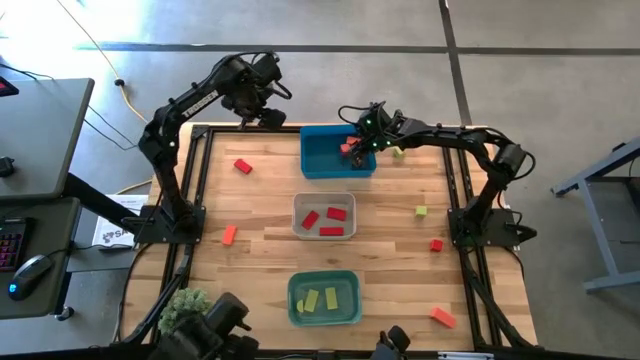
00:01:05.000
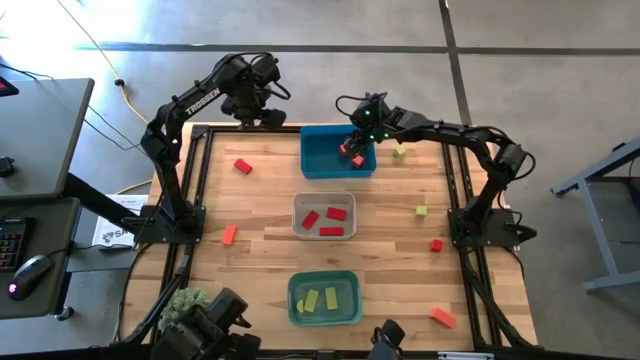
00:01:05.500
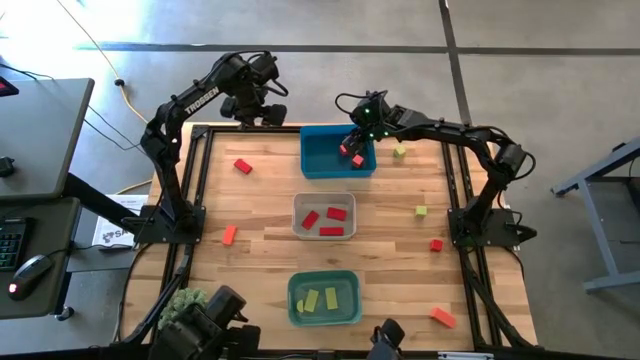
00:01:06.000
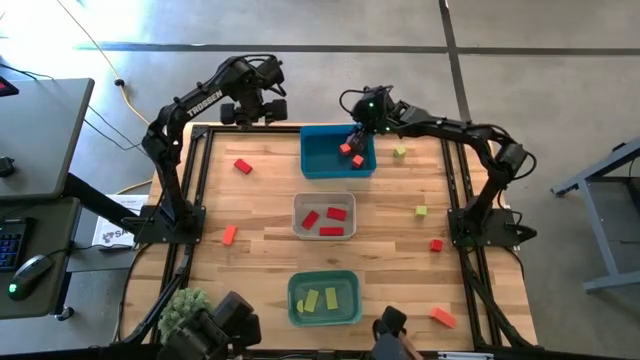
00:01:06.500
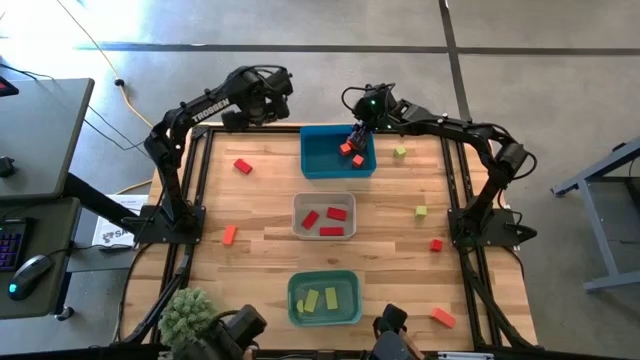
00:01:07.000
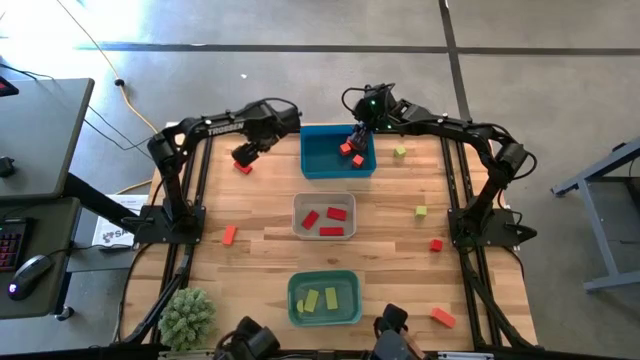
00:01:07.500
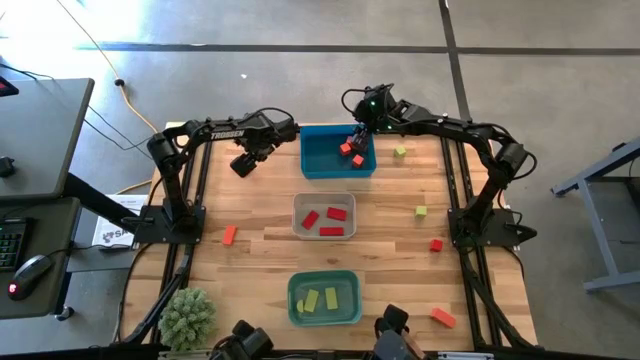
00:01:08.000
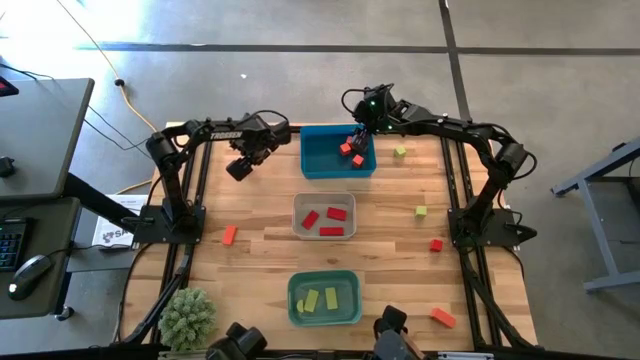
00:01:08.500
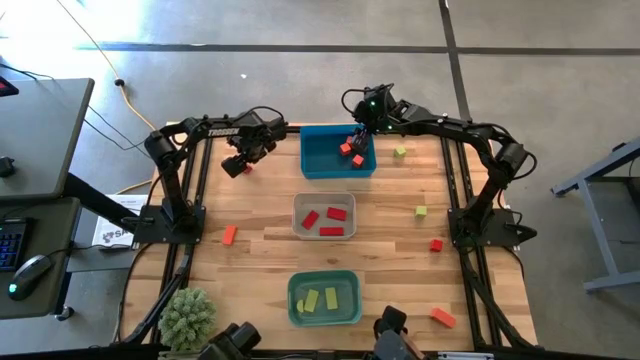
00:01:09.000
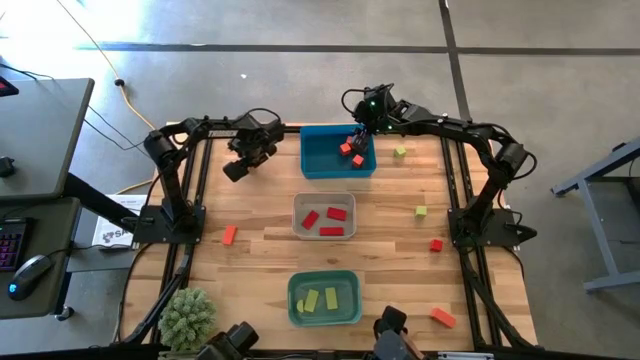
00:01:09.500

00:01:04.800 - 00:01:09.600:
Task: Sort & place blocks by color
Put the red block into the gray bin

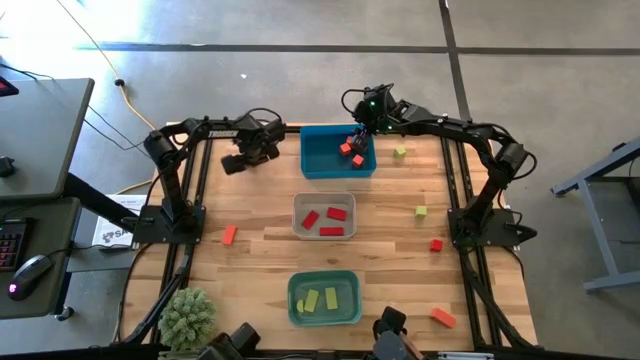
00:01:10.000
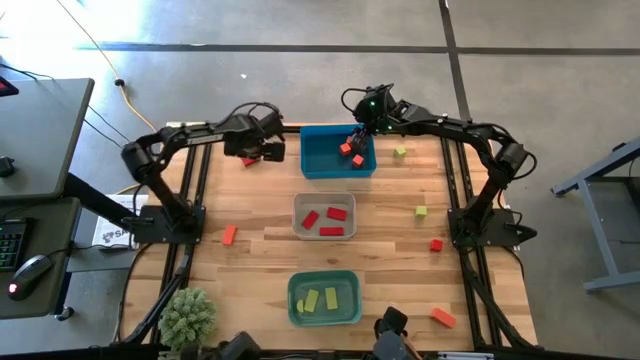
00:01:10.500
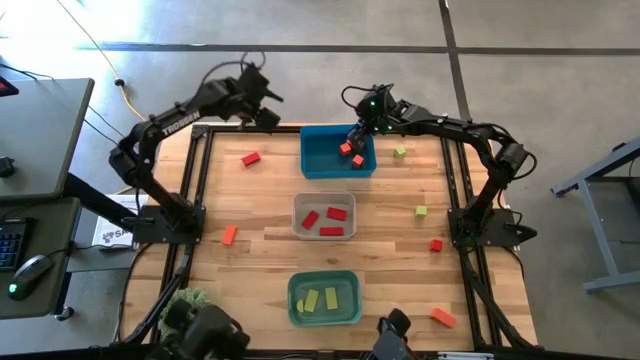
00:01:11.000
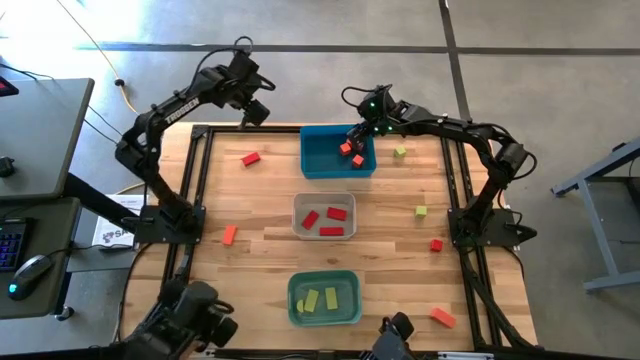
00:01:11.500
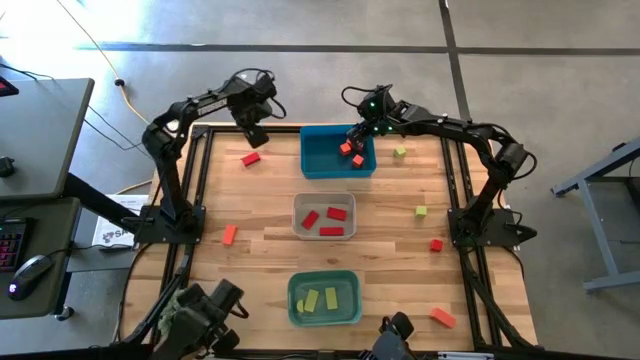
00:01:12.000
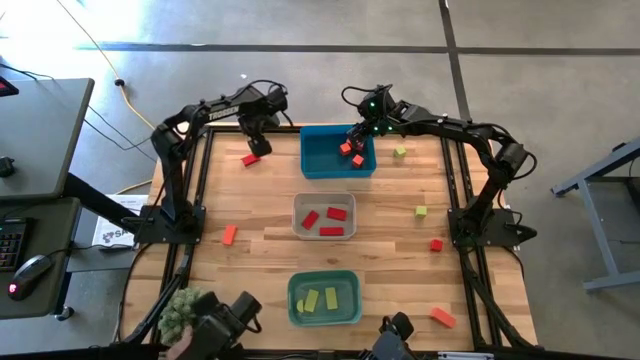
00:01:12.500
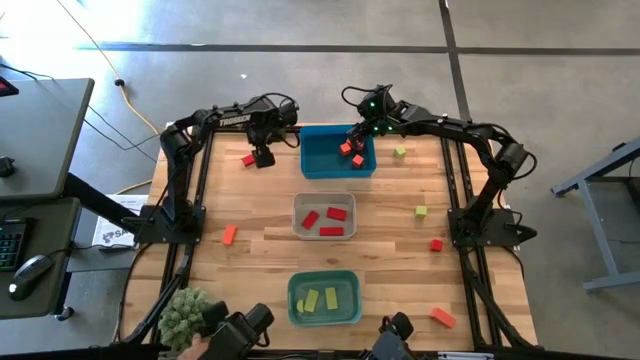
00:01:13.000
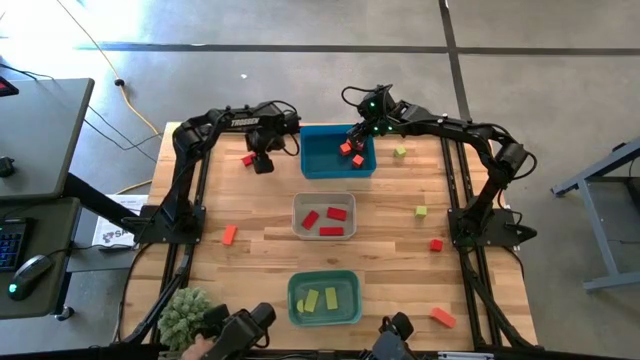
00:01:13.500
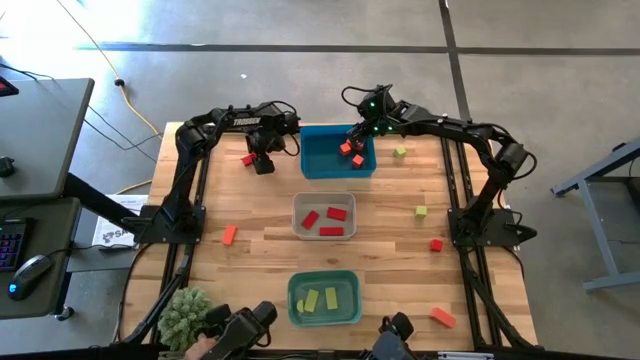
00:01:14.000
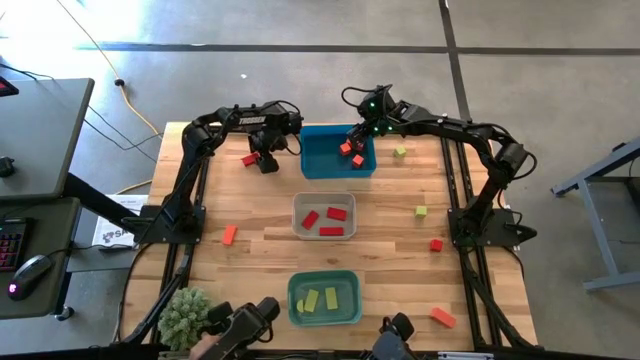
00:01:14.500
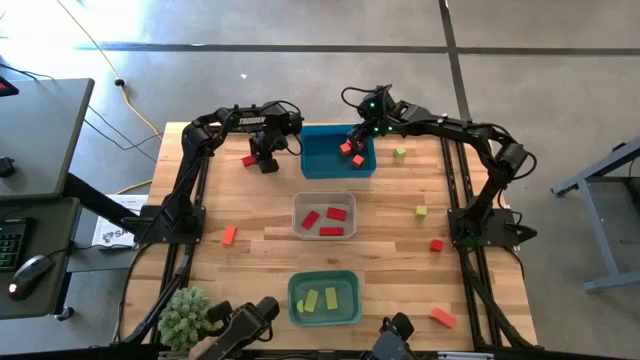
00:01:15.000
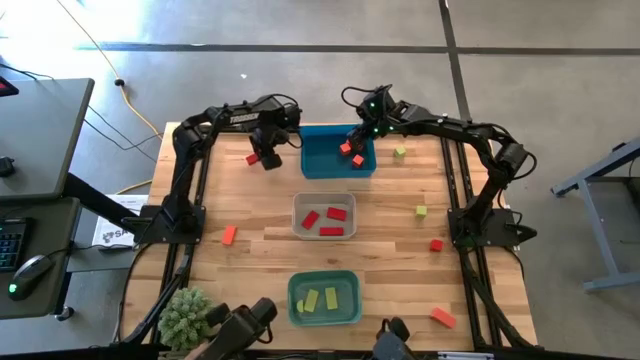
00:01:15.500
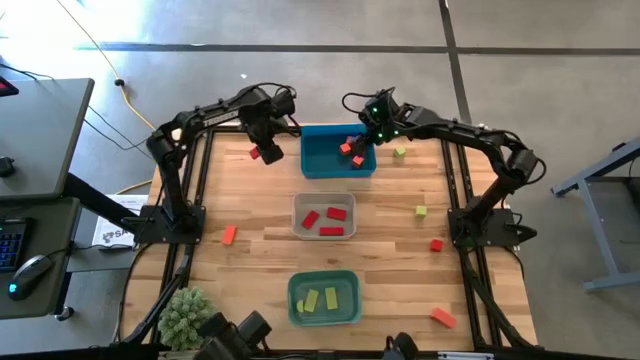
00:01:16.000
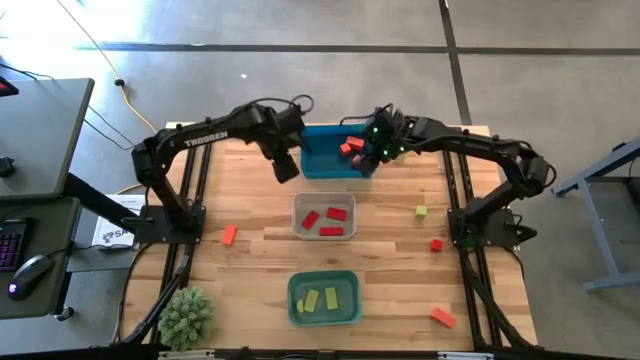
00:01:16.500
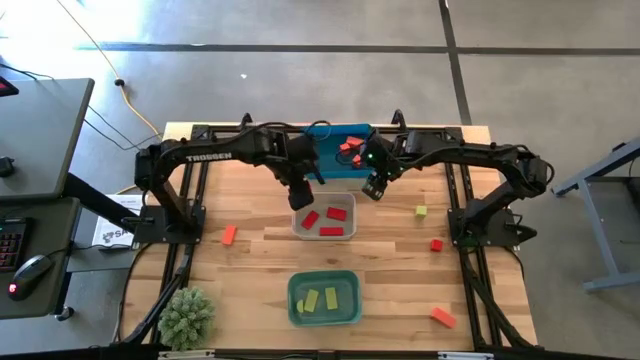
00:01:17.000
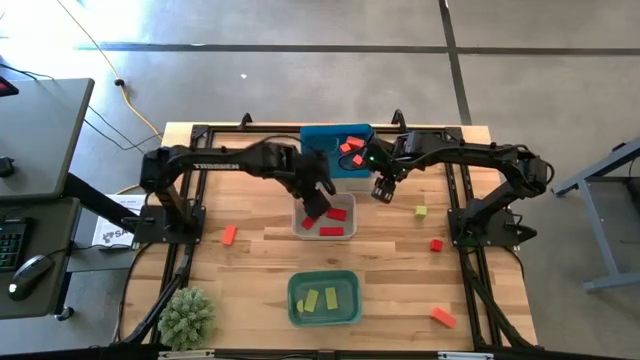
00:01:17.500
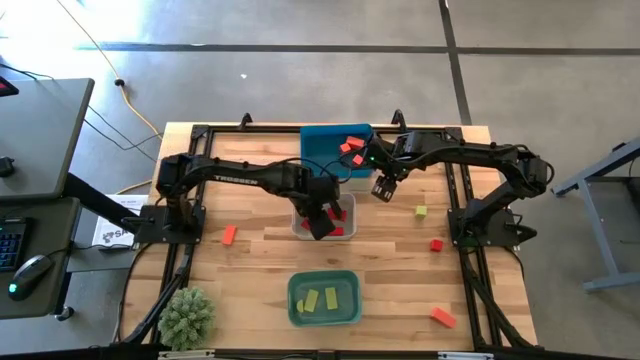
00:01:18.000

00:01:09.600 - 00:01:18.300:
Put the red block into the gray bin

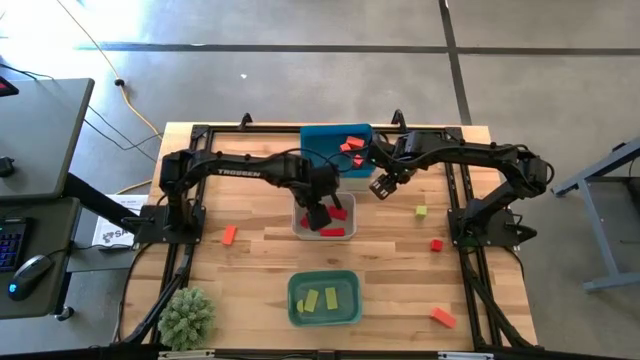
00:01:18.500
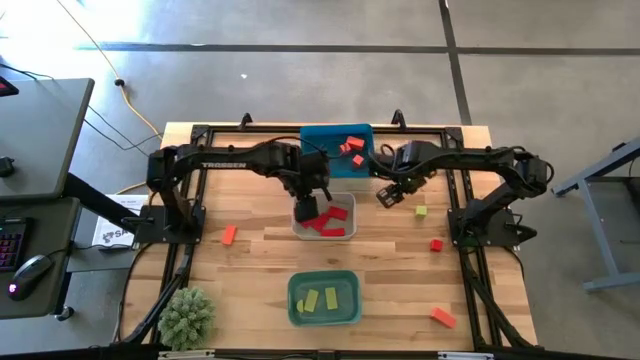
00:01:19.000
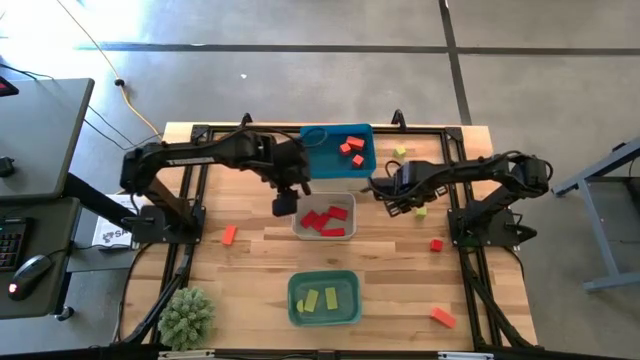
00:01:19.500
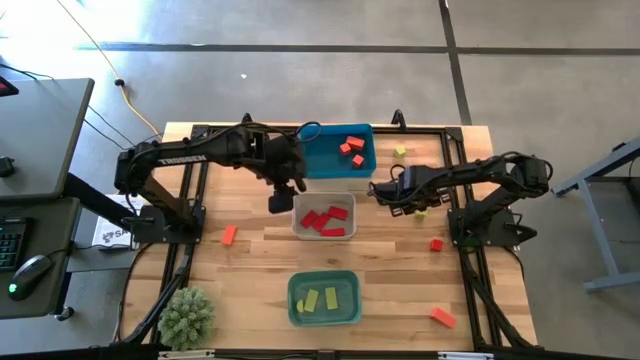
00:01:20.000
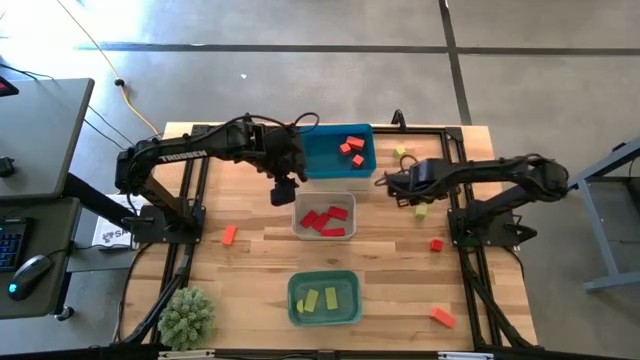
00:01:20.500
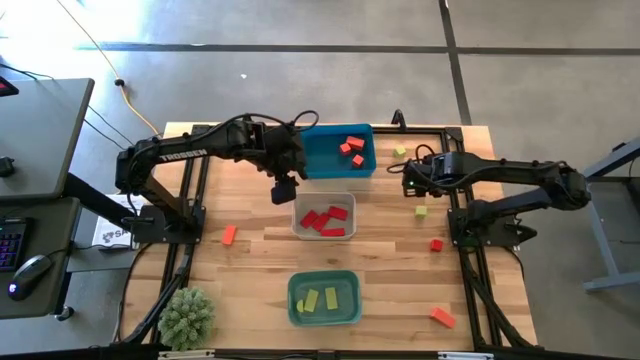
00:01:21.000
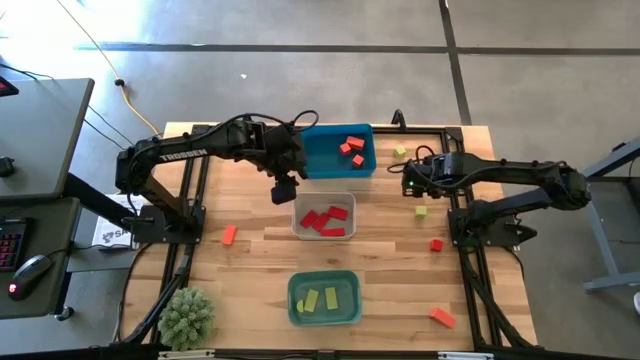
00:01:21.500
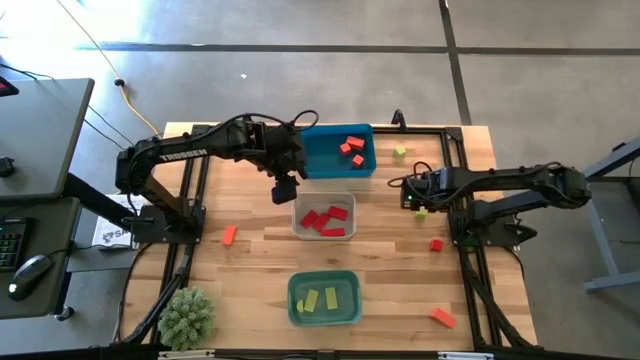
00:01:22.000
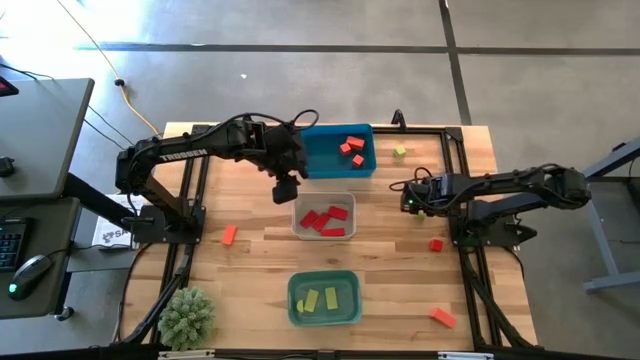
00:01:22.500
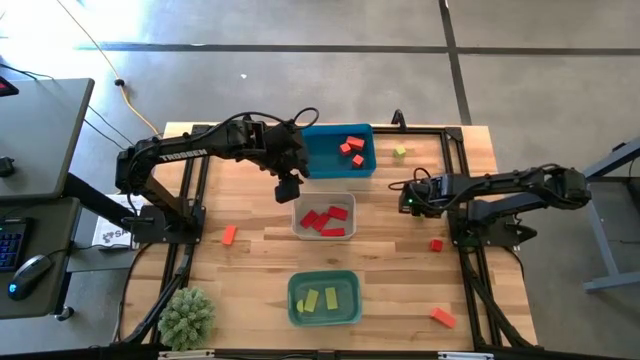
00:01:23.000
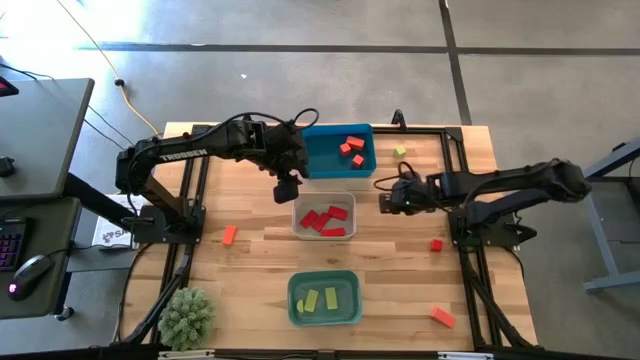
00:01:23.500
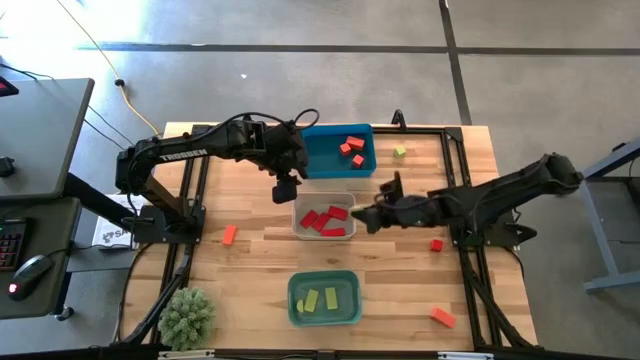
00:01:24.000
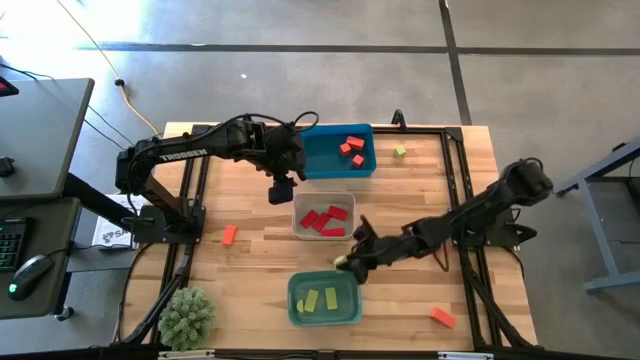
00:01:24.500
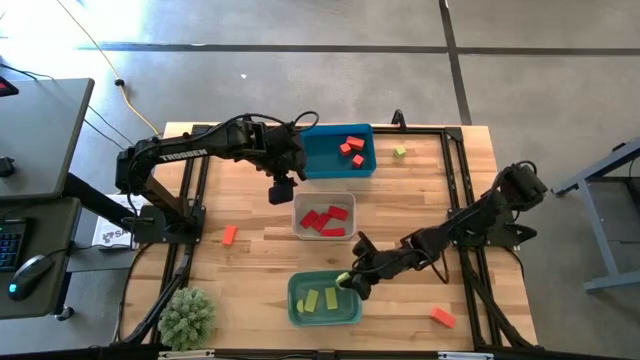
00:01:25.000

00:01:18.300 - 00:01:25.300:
Put the light green block into the green bin

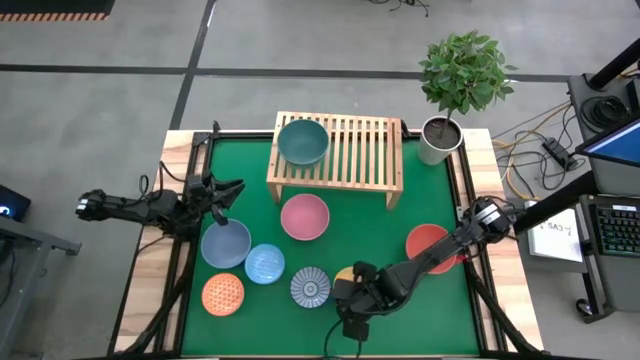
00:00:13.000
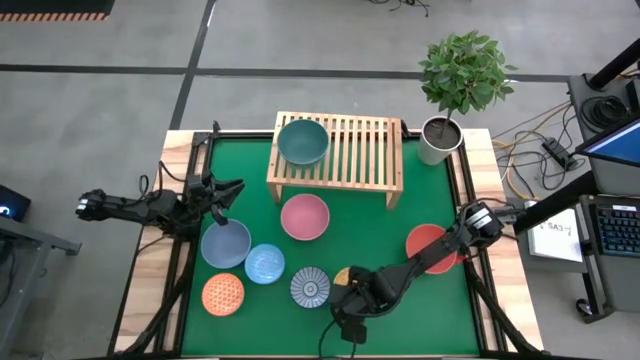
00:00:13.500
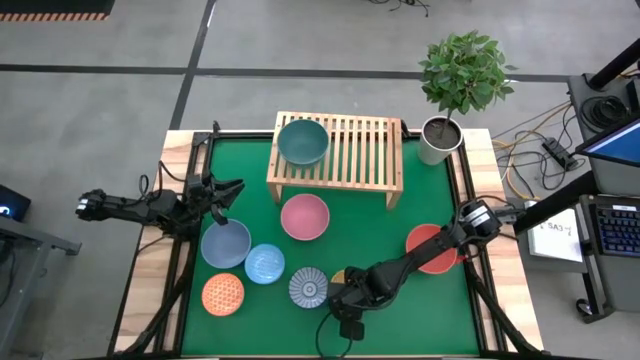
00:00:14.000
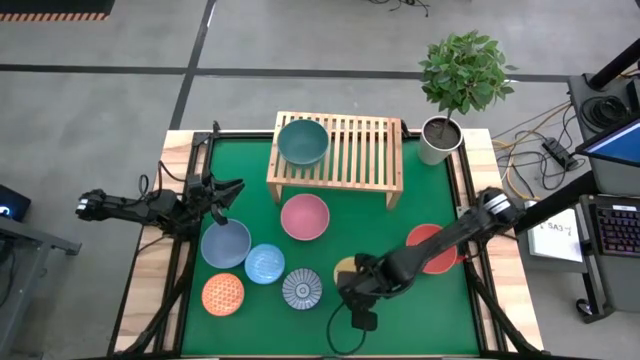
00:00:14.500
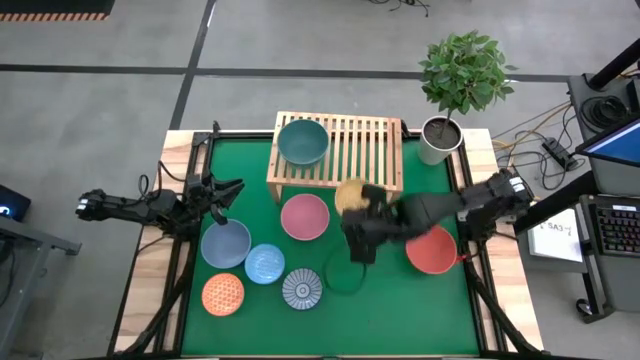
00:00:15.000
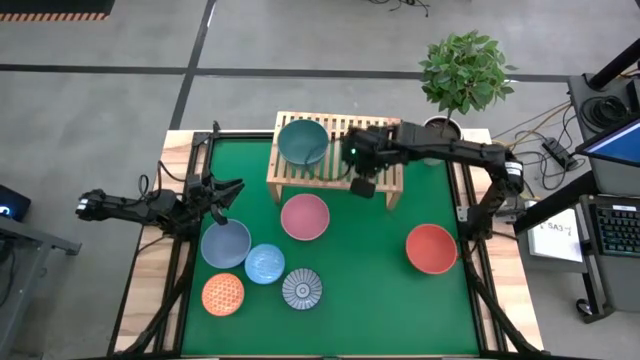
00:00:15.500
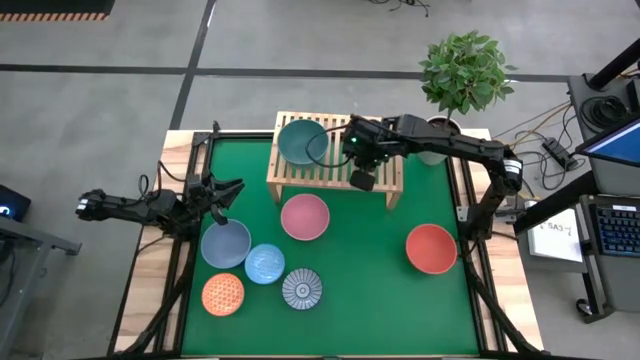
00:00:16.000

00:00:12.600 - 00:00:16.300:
Task: Place and stack bowls onto a shelf
Put the yellow patterned bowl on the shelf
